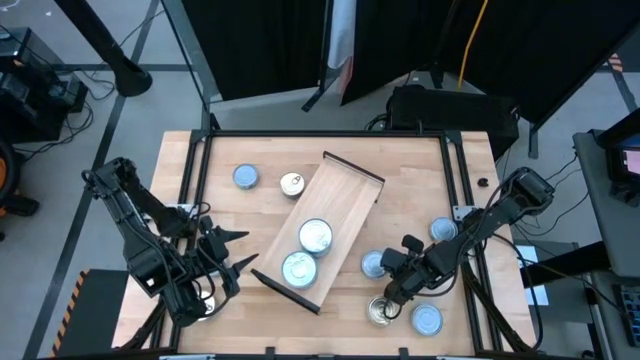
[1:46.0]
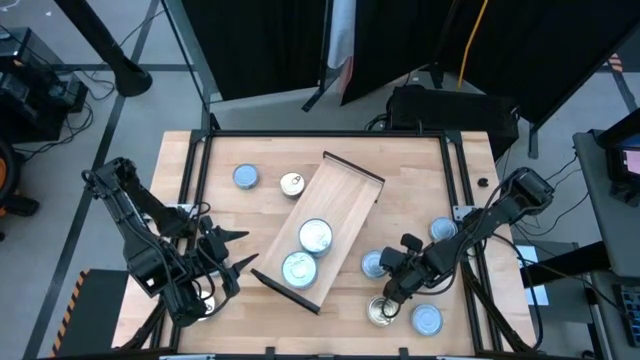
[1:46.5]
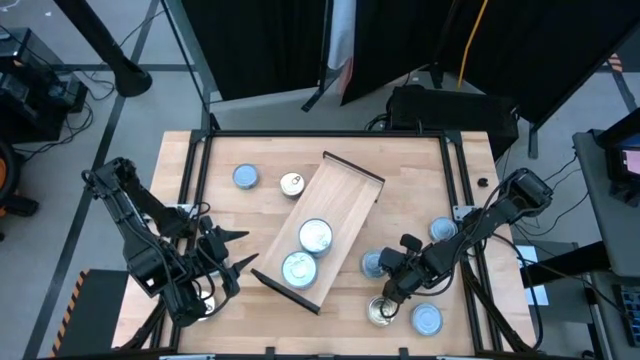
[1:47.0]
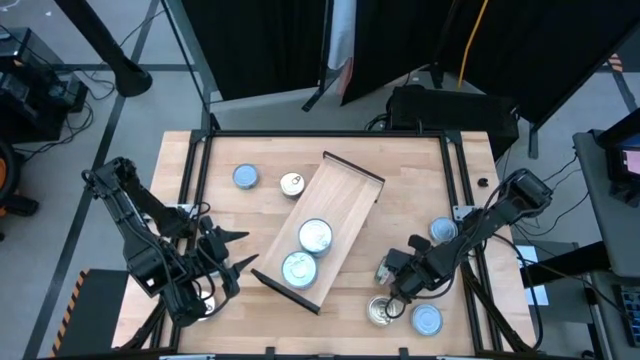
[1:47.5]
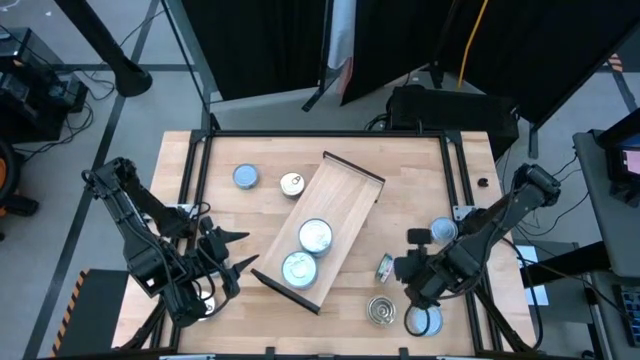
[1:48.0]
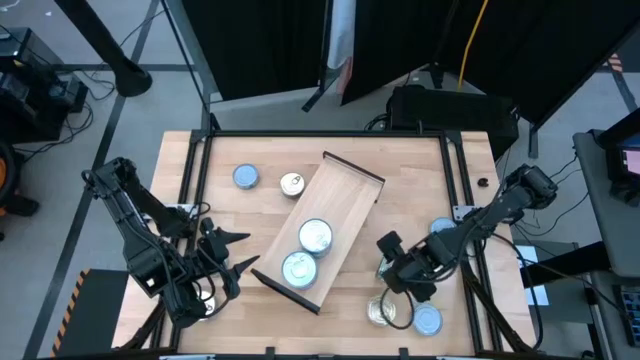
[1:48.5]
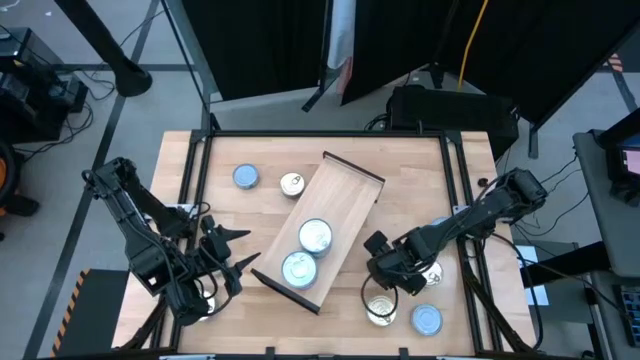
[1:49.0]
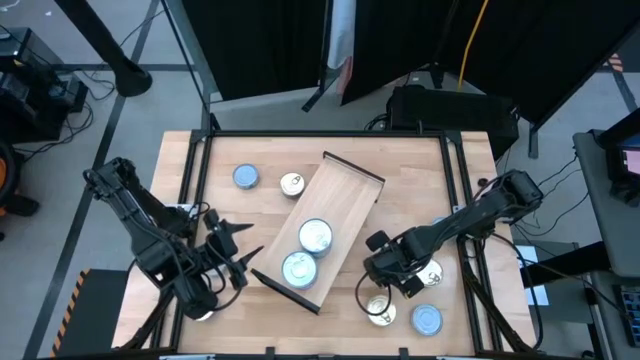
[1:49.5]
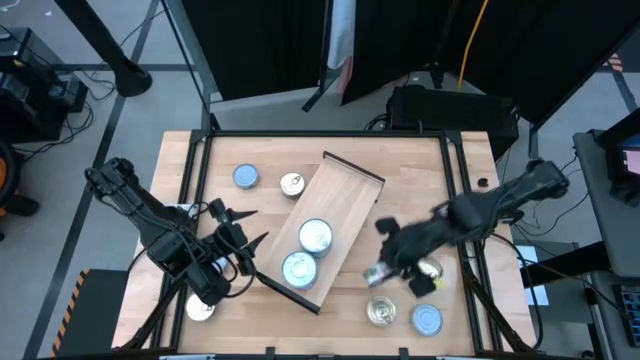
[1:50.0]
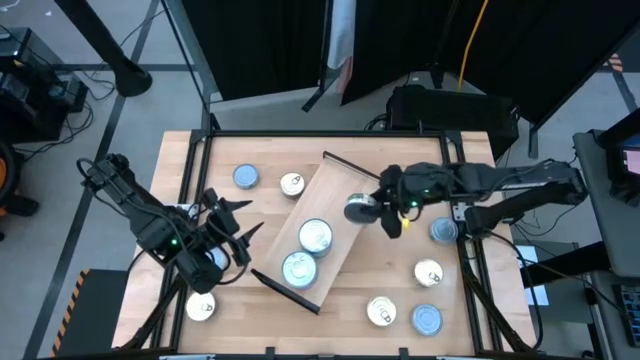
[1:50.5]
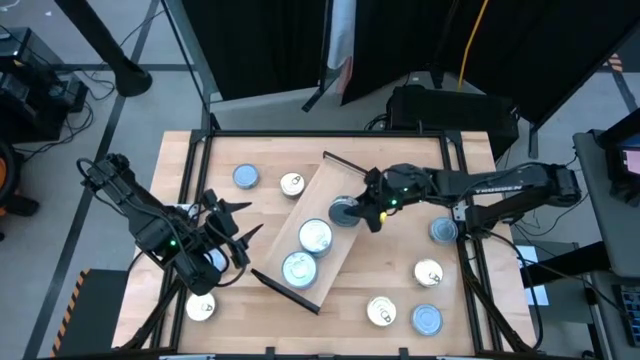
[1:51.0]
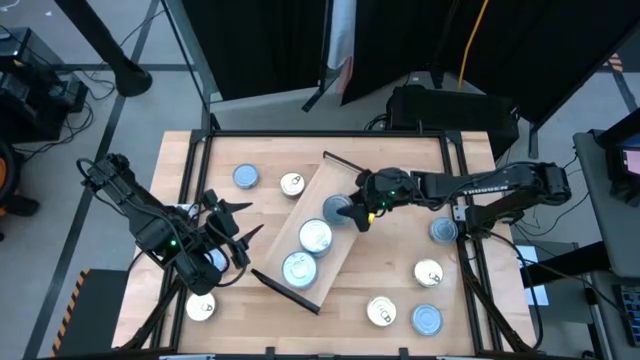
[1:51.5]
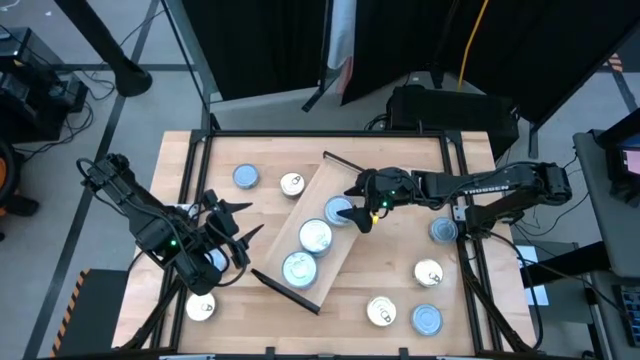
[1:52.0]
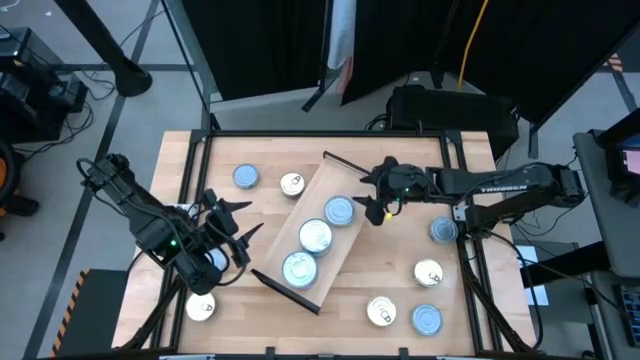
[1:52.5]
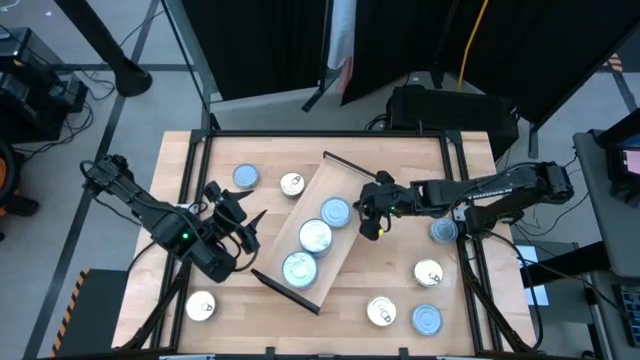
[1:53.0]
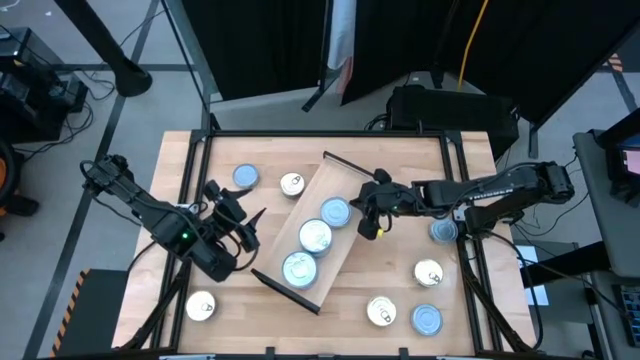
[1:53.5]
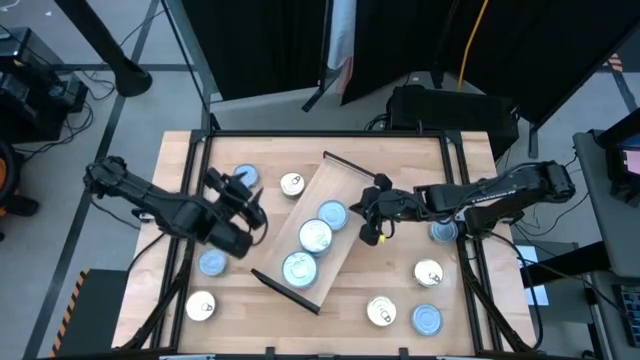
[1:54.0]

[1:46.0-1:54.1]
Task: Stack canned seafood by type on shelf
Put the green tuna can on the shelf

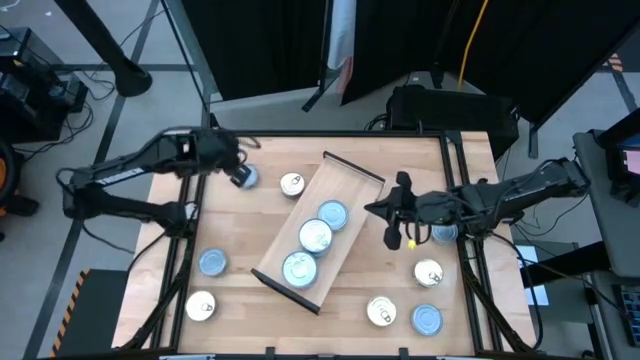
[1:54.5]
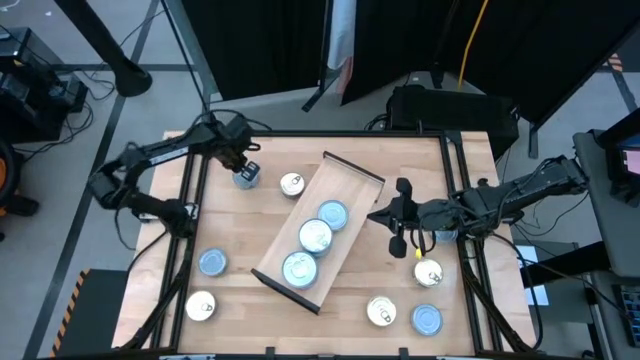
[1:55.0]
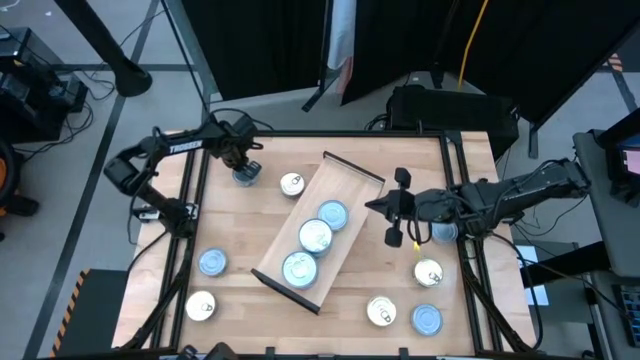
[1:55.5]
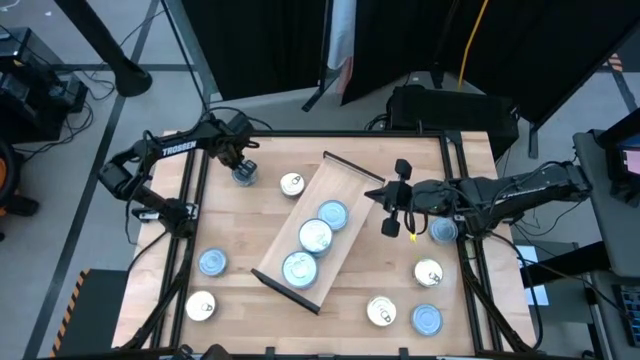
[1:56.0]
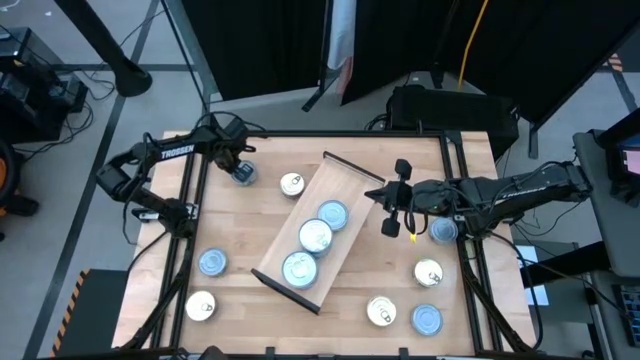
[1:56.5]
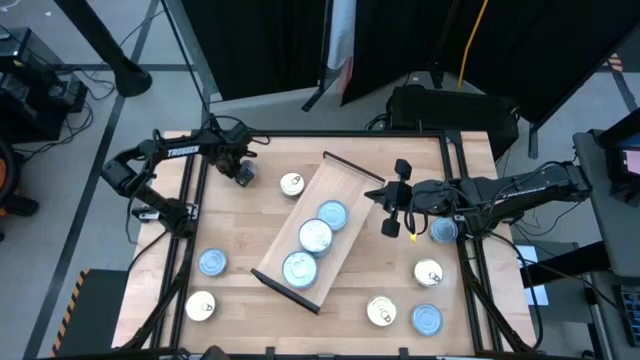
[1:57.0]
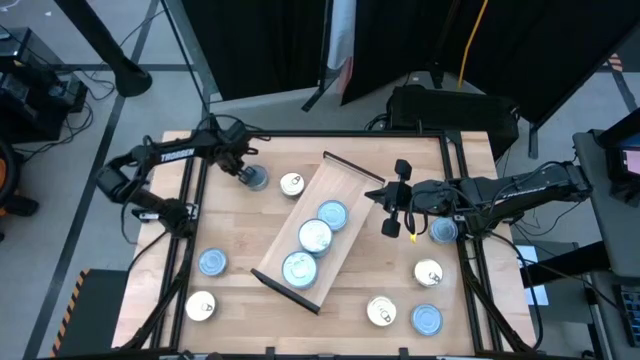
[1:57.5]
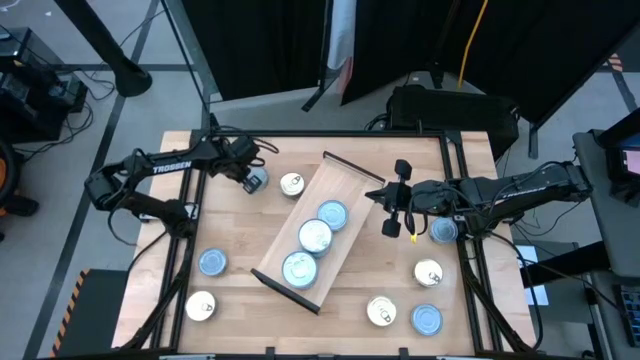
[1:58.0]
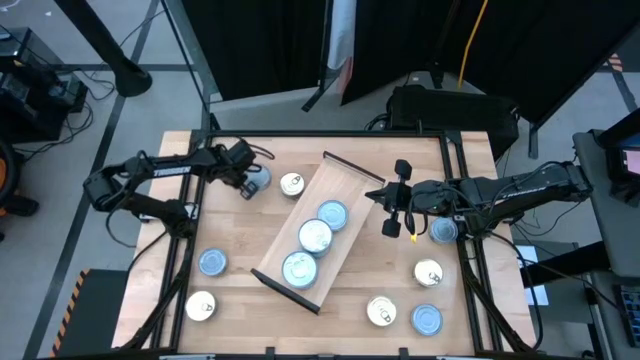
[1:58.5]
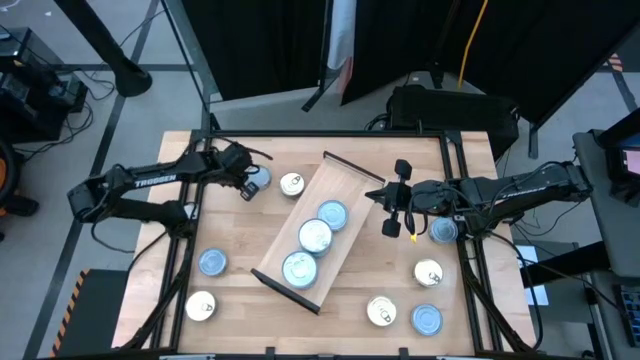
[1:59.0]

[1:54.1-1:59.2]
Stack the green tuna can on top of the other green tuna can on the shelf

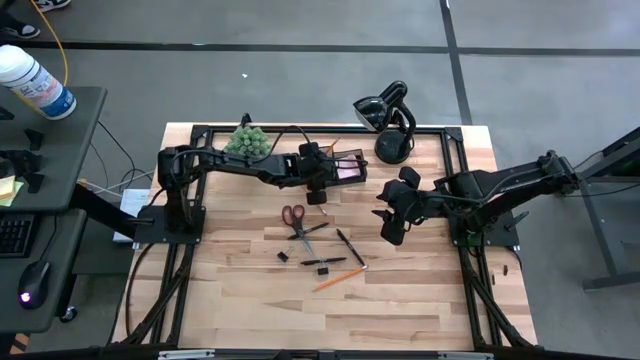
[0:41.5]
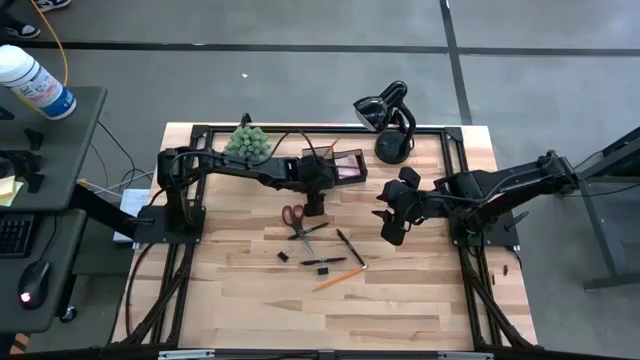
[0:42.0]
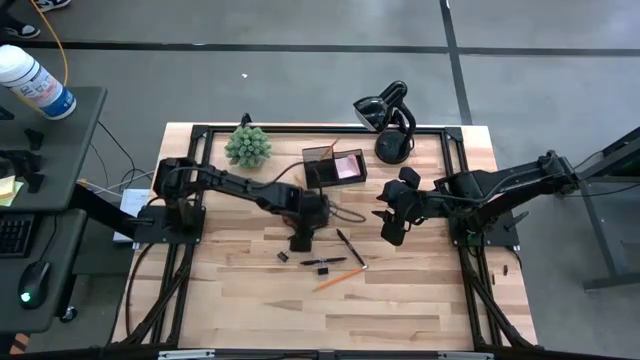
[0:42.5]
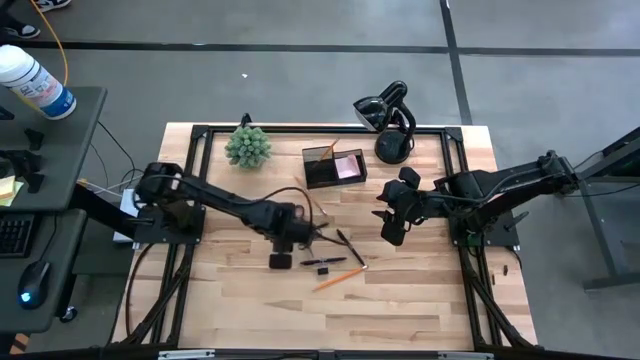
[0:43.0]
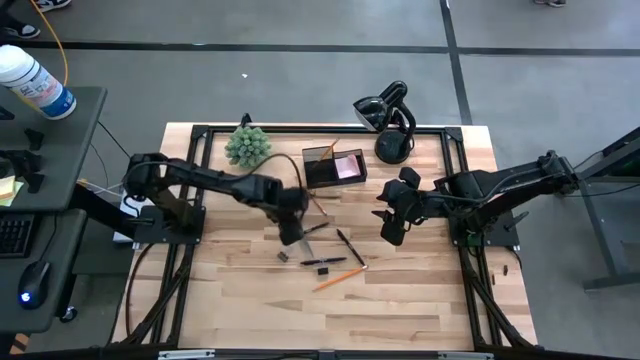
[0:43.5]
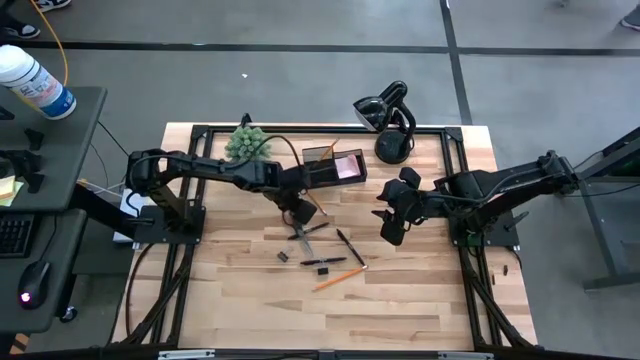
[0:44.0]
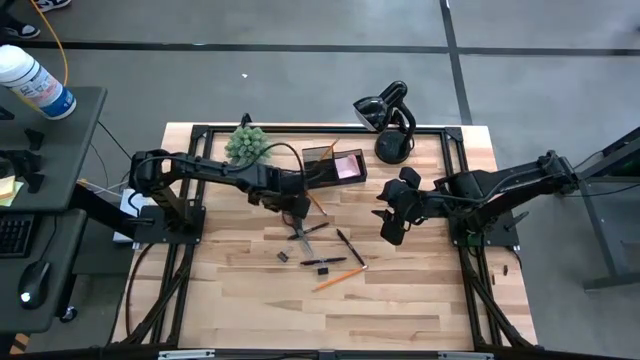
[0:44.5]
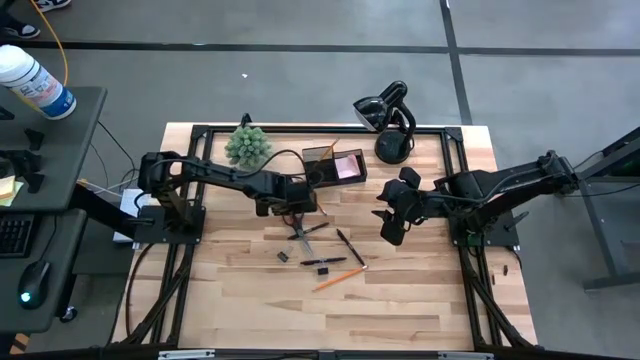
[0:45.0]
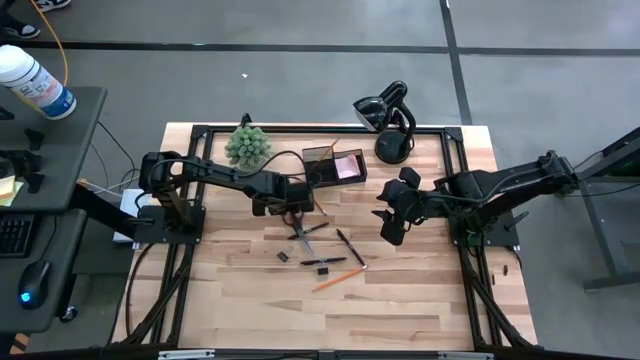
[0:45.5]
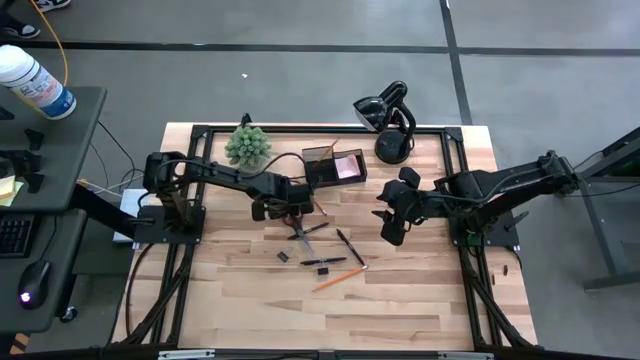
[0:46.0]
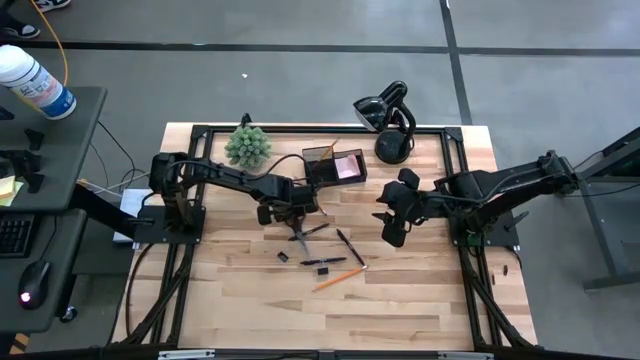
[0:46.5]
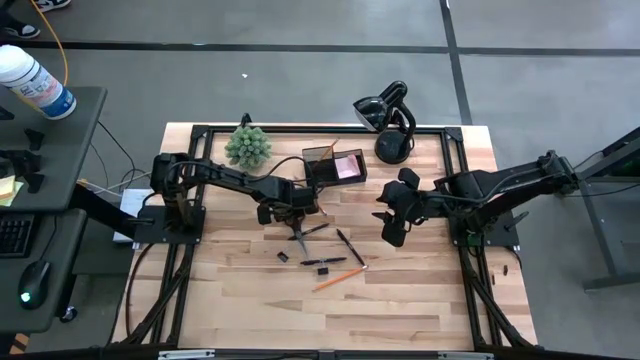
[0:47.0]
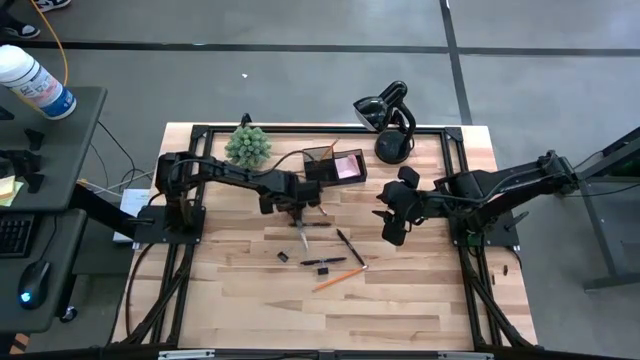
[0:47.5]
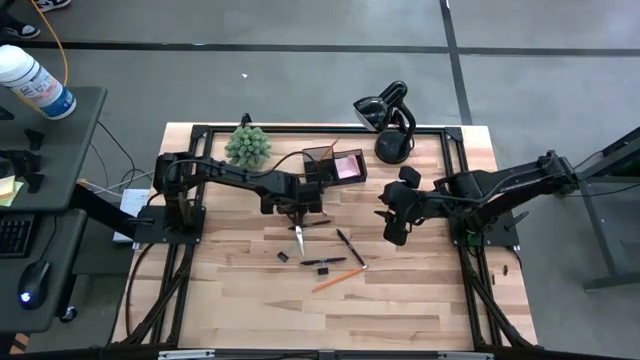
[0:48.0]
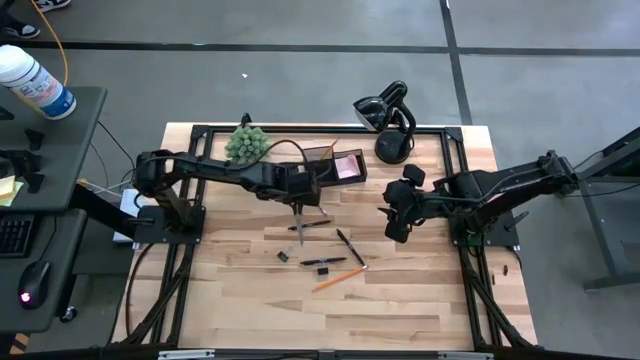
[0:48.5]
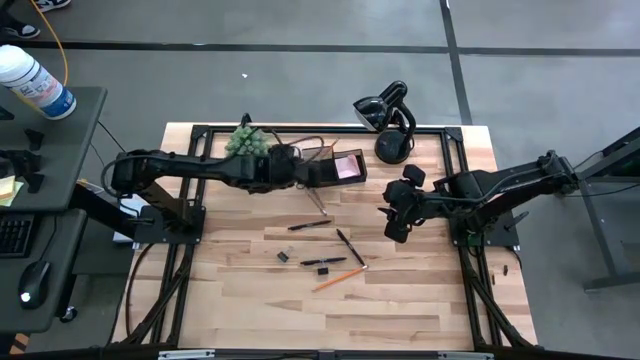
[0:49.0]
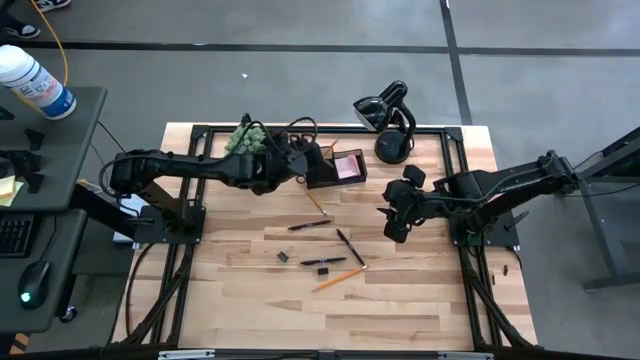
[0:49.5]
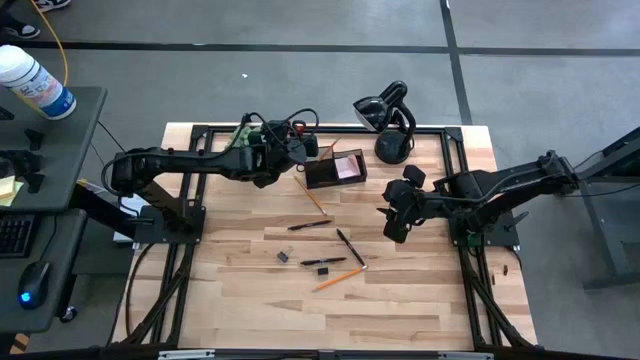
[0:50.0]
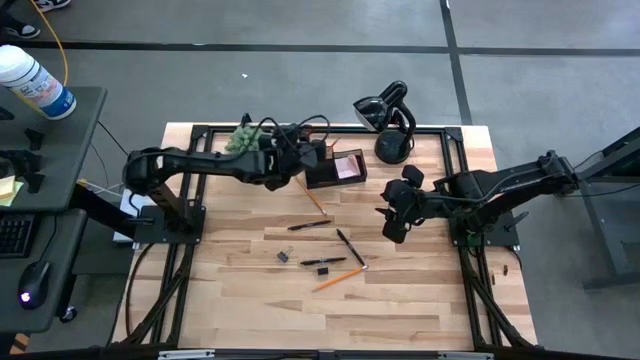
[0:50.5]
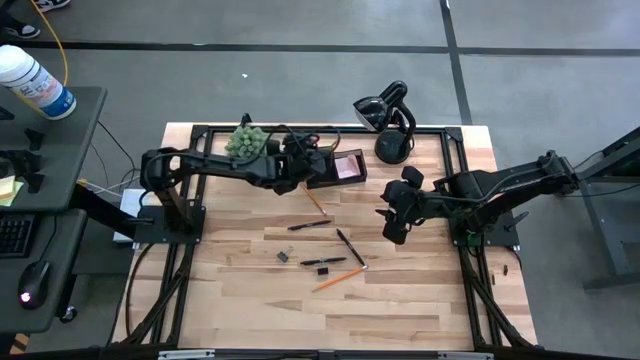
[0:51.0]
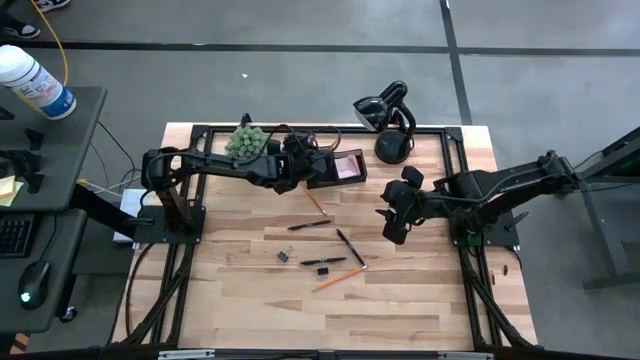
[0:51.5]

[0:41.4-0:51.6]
Task: Pick and place office supplies into organizer
Put the black scissors into the black desk organizer
